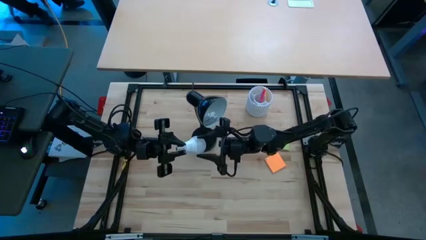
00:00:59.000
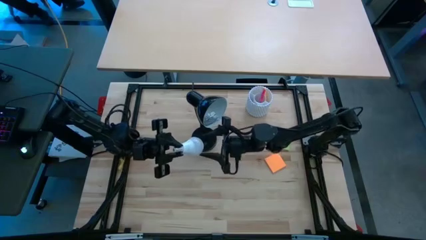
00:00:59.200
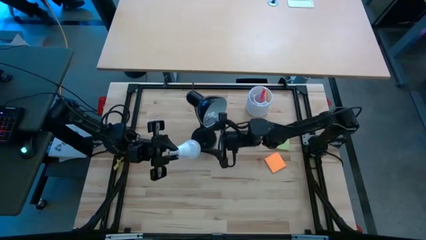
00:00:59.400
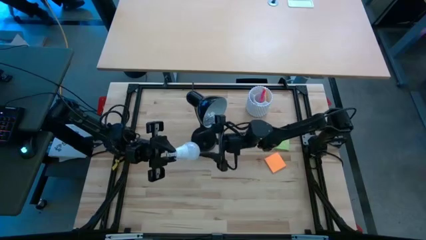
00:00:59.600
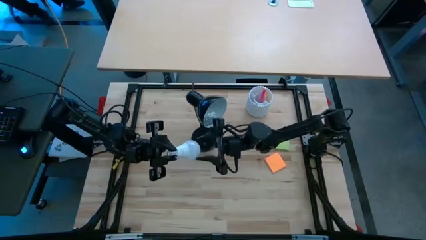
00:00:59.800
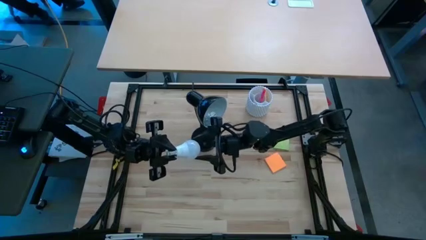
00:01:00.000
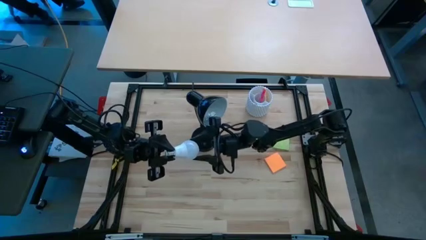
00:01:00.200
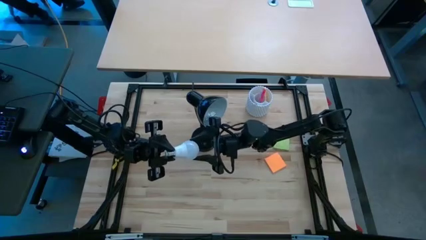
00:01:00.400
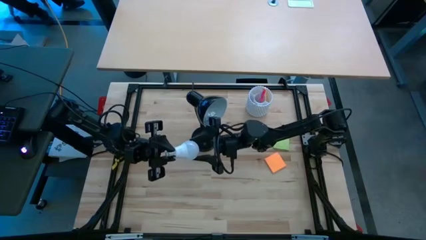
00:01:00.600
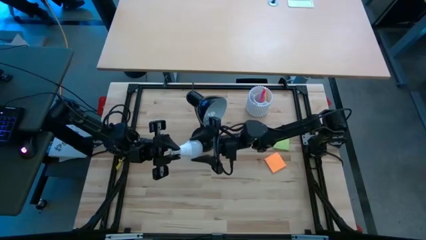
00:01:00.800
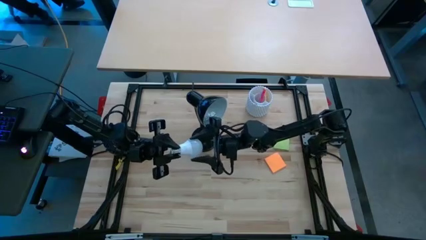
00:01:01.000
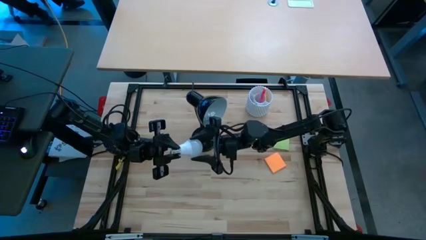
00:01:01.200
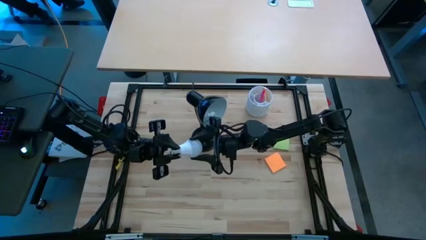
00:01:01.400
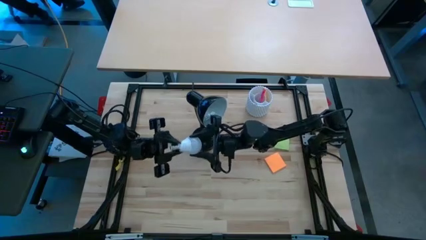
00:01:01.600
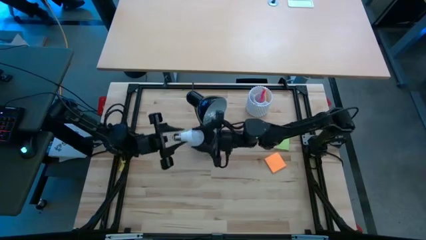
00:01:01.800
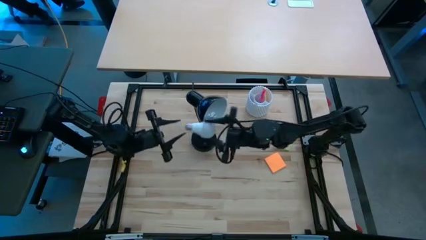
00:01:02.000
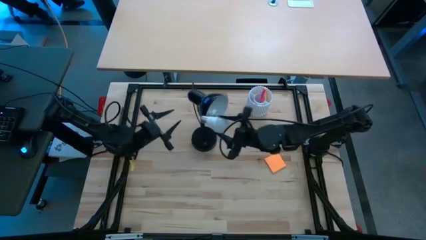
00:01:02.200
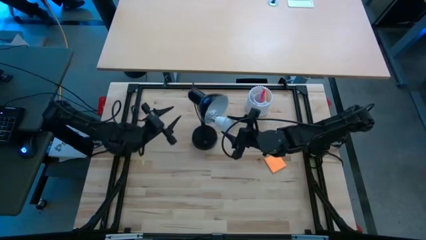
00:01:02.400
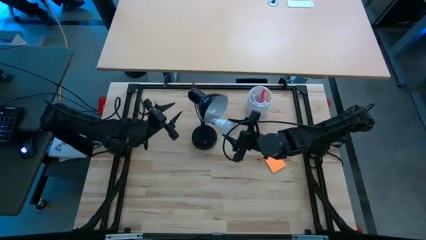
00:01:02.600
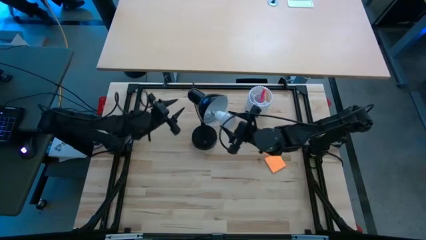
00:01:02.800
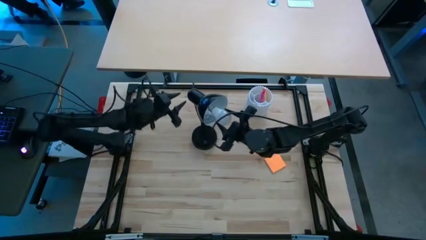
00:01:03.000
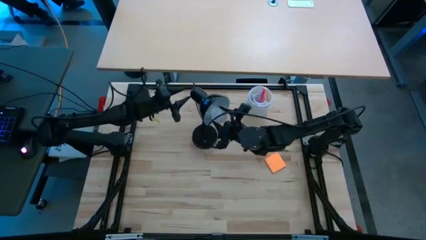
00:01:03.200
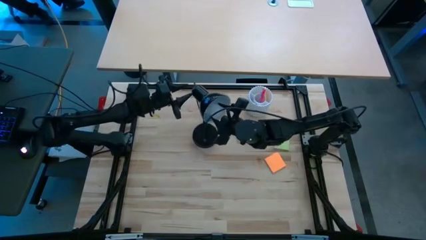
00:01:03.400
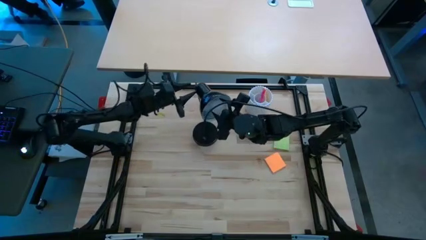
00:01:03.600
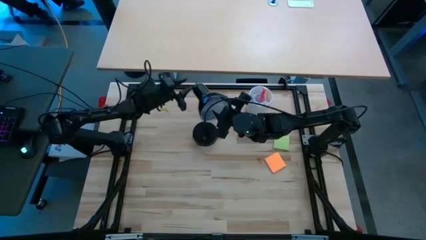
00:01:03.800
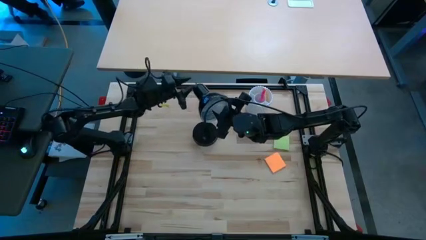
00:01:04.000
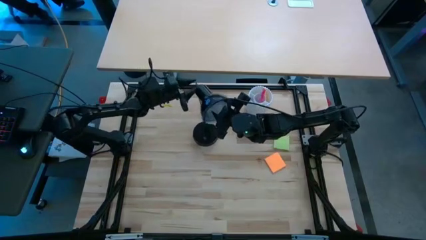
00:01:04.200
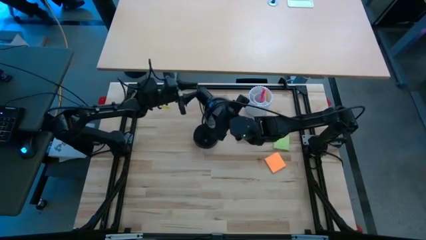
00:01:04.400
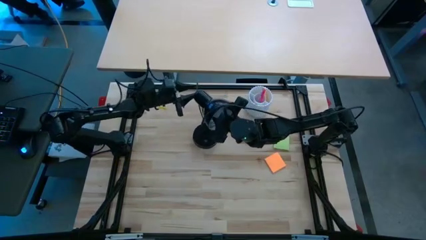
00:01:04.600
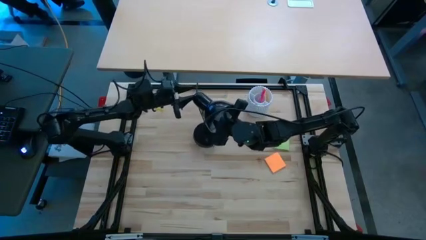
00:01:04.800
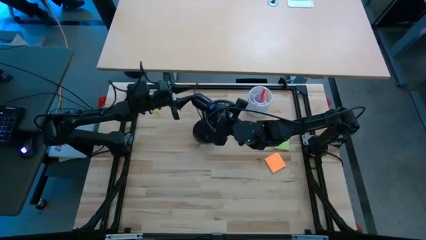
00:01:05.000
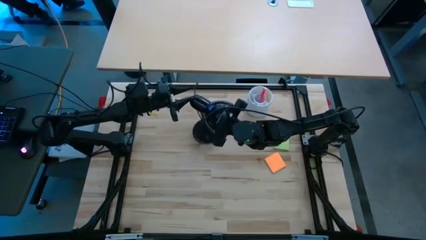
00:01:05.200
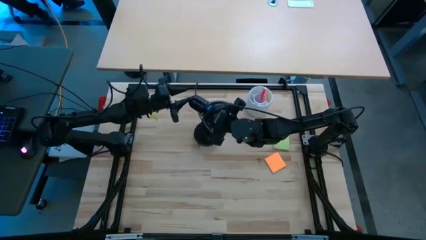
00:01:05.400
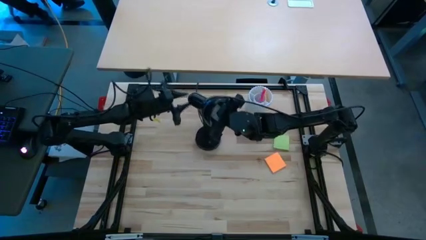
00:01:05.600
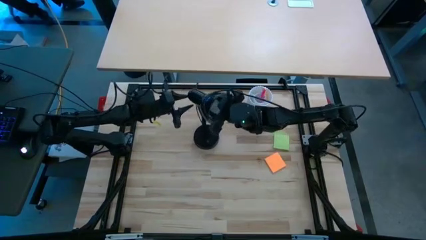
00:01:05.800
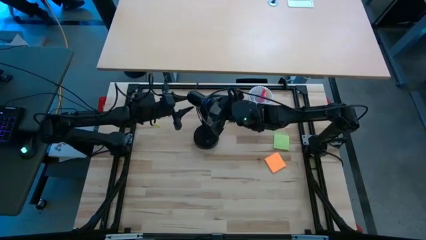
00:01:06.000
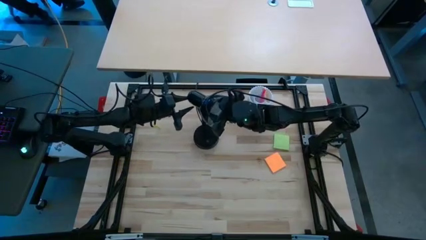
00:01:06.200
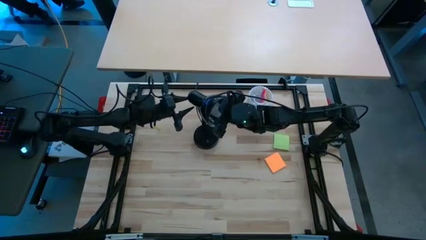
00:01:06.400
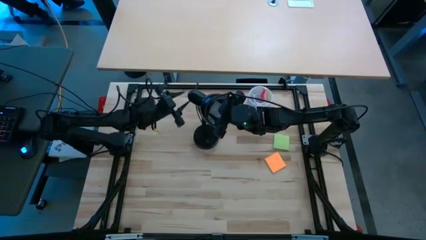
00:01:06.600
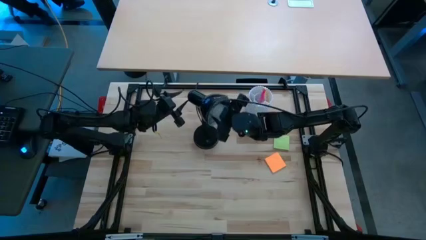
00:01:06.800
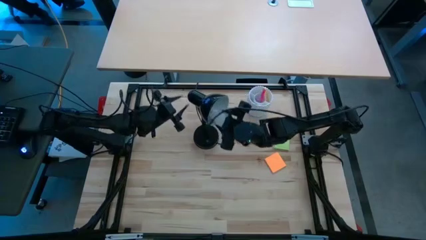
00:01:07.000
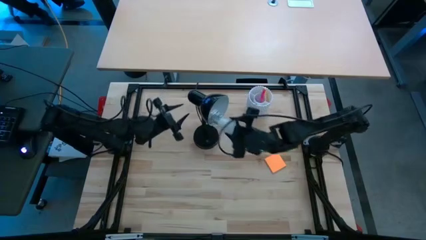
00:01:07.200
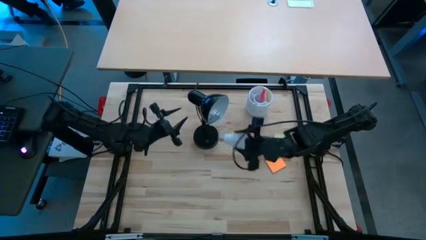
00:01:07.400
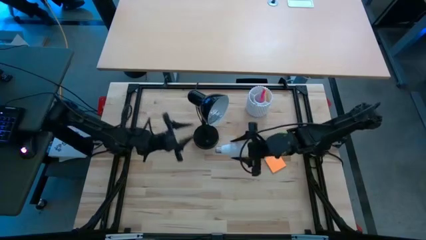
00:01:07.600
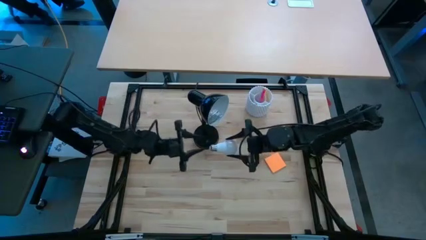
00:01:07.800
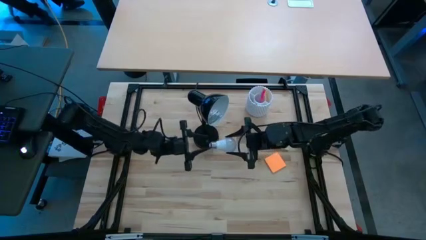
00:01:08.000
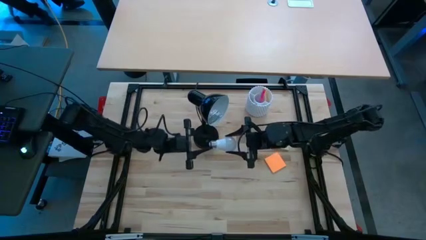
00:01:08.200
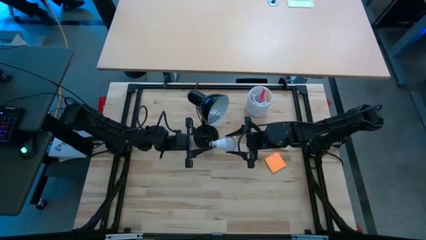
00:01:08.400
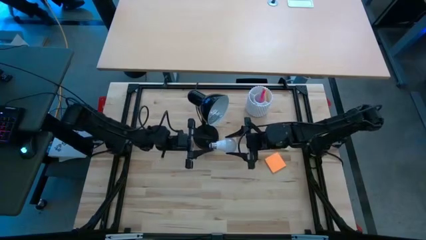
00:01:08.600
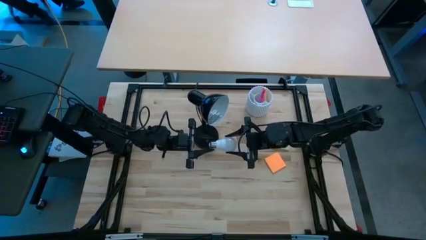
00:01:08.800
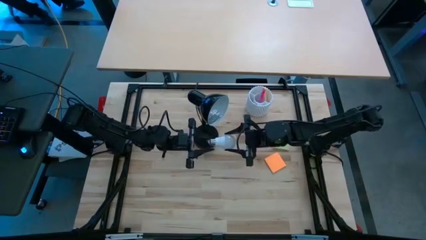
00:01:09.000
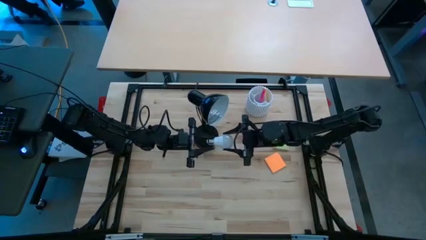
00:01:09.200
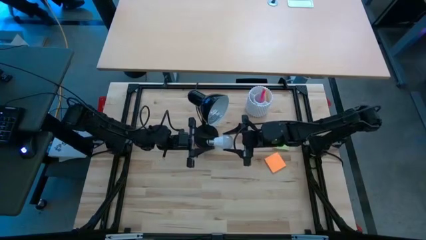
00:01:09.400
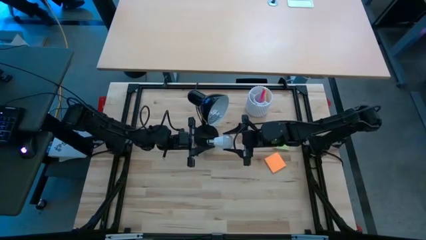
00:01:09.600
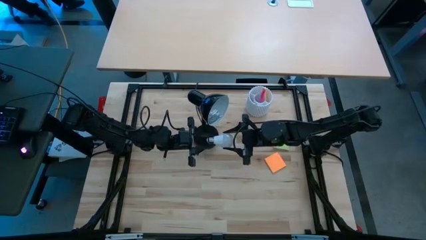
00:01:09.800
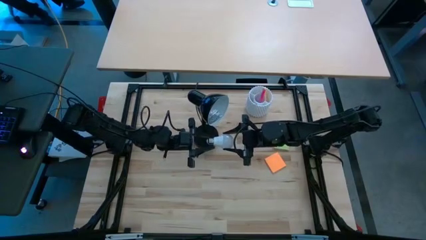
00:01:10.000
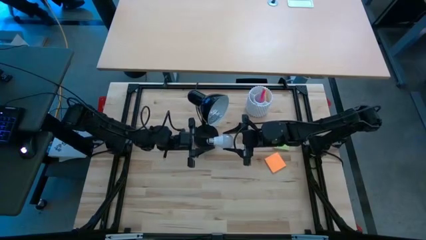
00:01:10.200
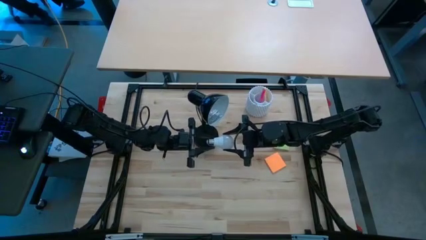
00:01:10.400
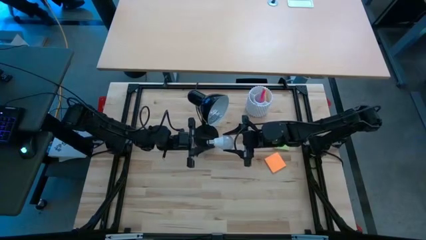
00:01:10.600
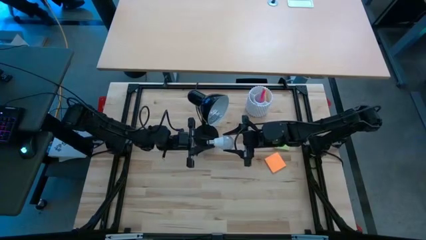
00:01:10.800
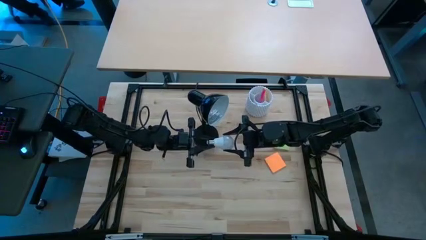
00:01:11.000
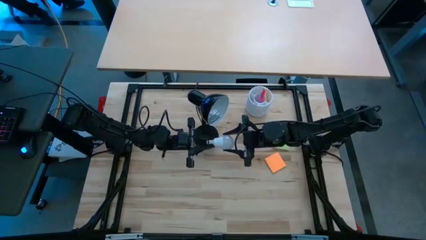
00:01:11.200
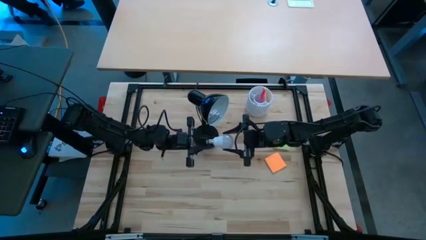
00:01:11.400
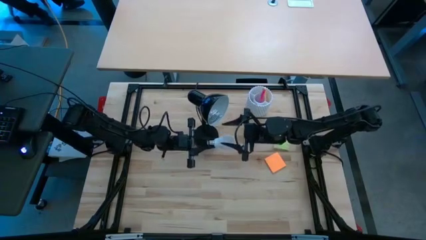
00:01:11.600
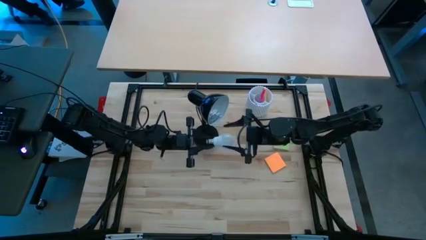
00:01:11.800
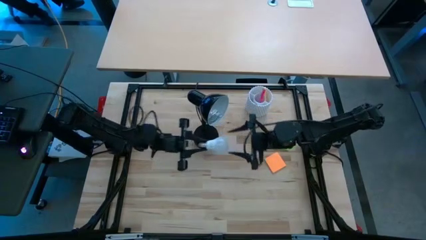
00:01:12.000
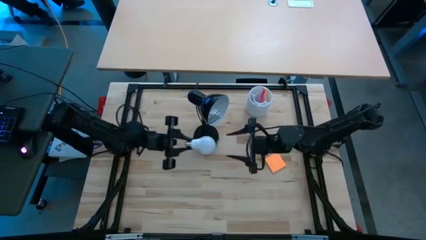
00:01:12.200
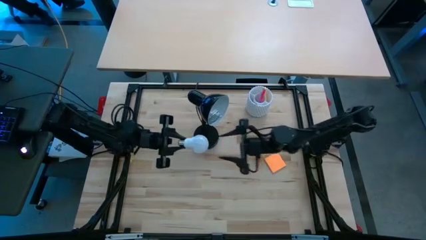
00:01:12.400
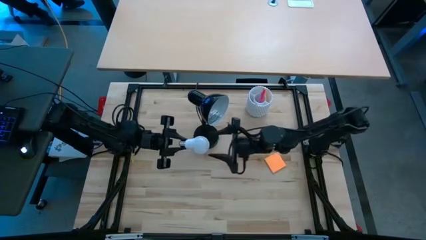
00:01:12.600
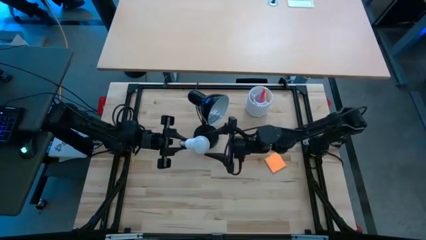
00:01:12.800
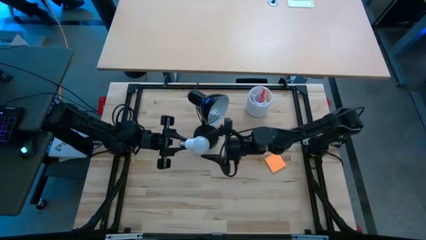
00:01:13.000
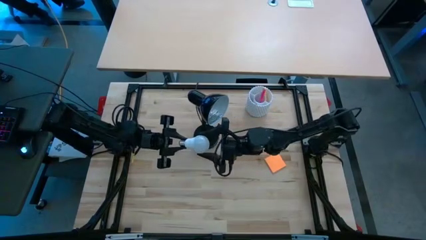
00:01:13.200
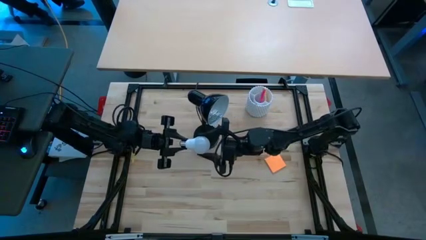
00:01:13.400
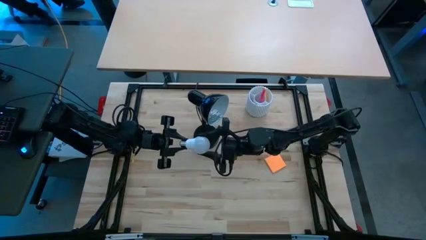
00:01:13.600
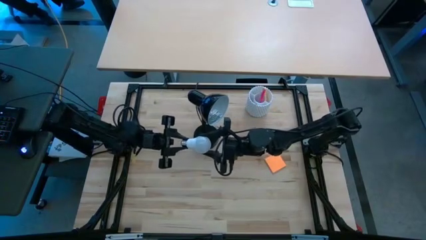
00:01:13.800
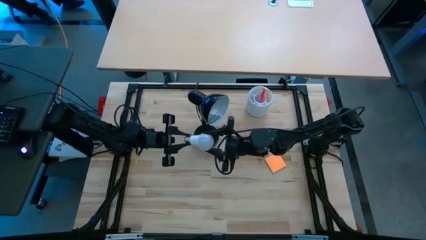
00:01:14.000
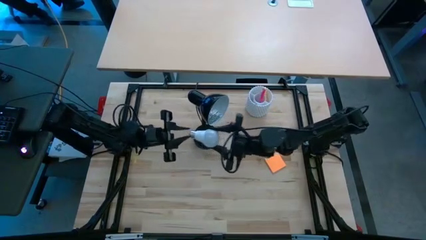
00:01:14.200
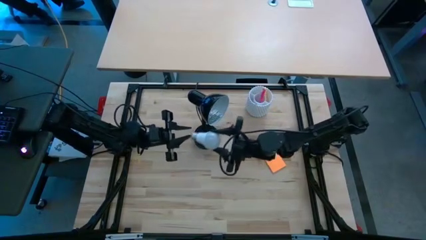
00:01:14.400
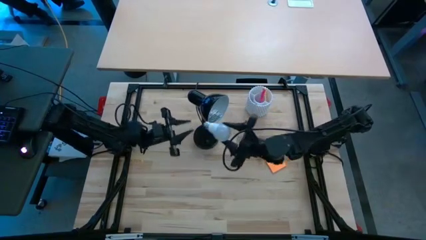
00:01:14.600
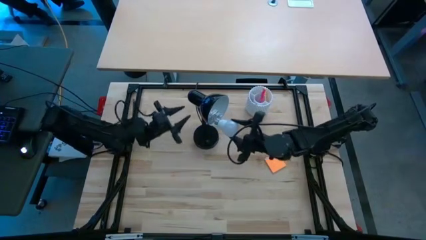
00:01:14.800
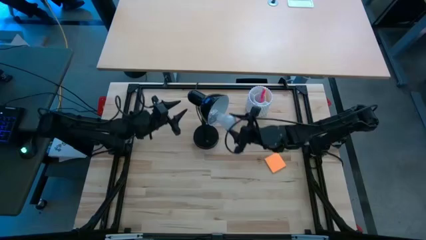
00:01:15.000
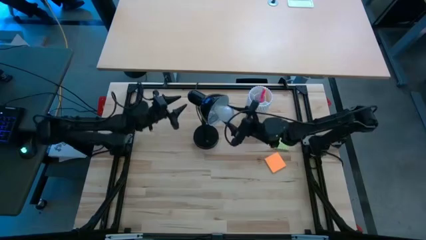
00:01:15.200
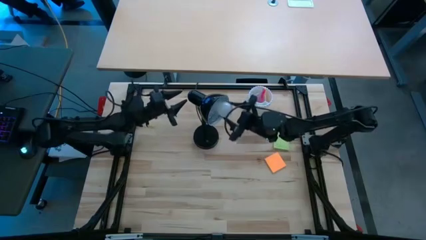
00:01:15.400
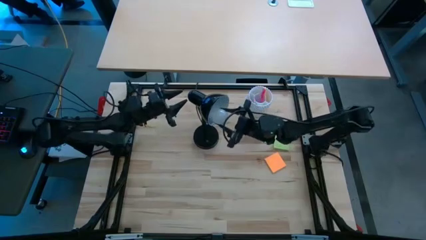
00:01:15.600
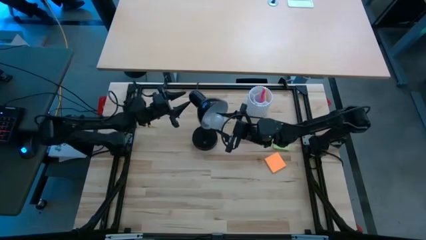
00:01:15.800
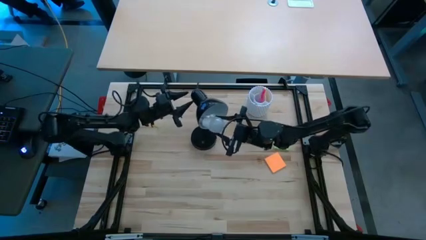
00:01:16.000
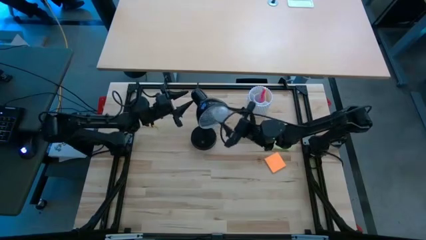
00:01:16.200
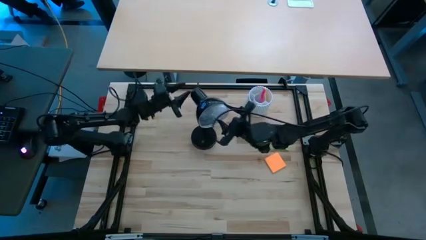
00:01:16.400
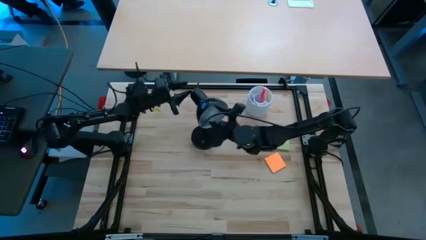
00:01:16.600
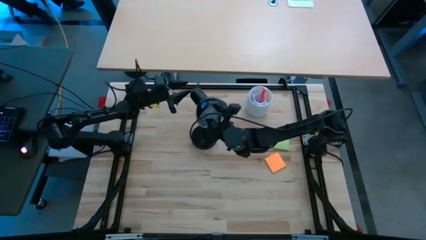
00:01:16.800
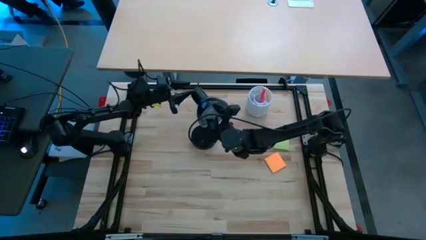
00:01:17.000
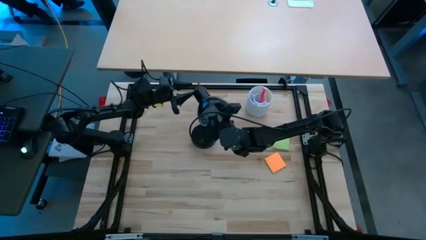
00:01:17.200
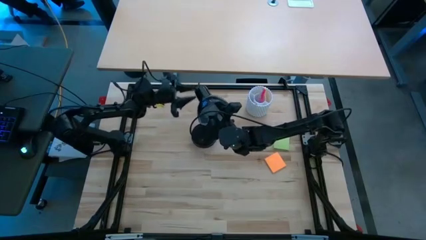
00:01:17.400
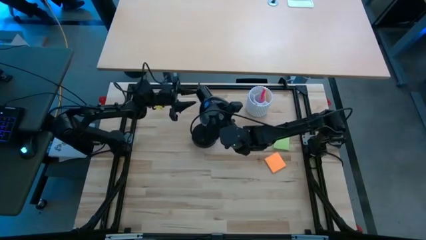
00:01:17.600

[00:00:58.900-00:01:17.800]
Task: Screw lightbulb
Insert the white lightbulb into the black lamp
